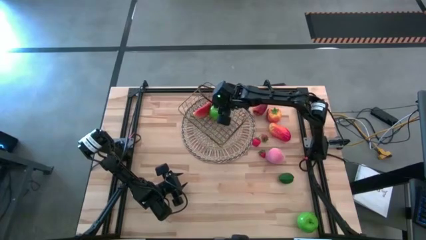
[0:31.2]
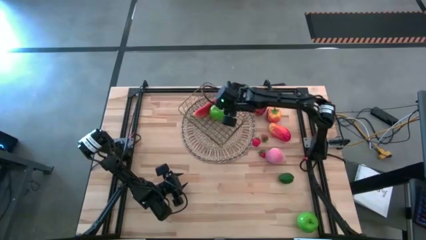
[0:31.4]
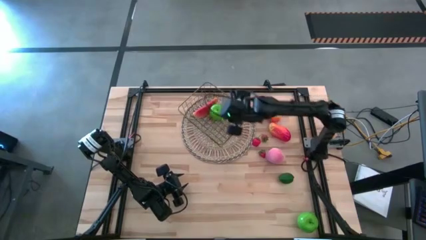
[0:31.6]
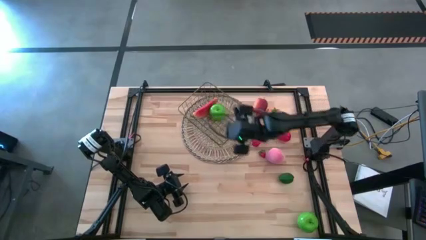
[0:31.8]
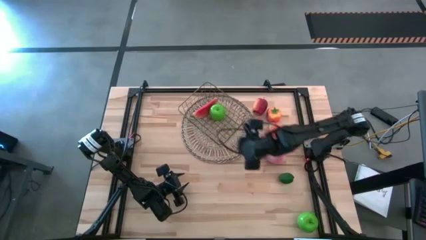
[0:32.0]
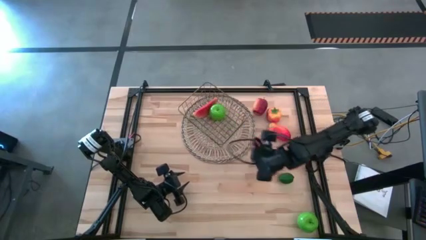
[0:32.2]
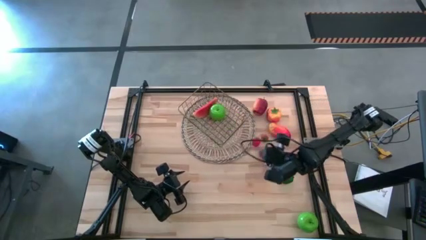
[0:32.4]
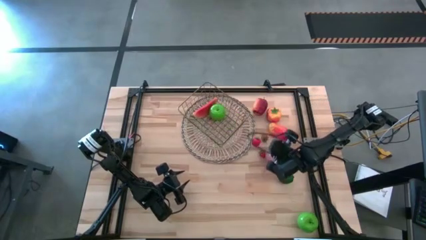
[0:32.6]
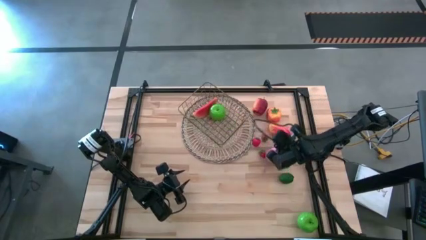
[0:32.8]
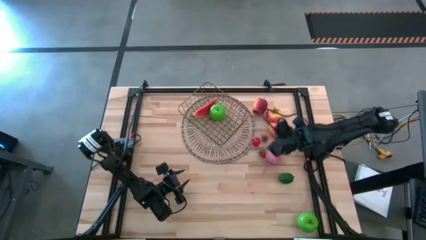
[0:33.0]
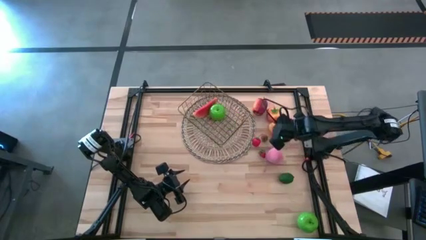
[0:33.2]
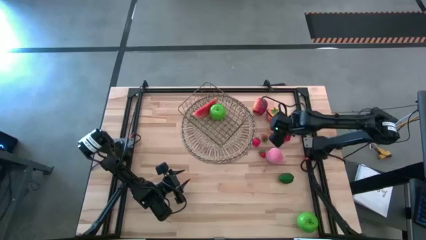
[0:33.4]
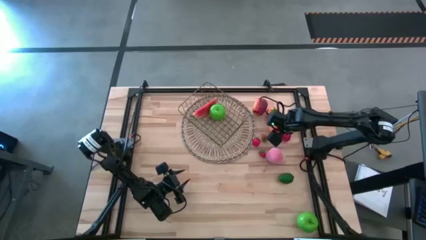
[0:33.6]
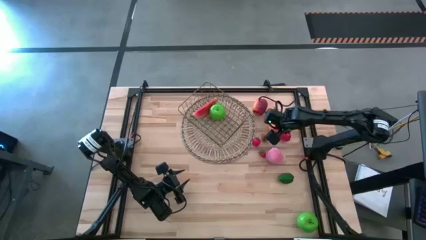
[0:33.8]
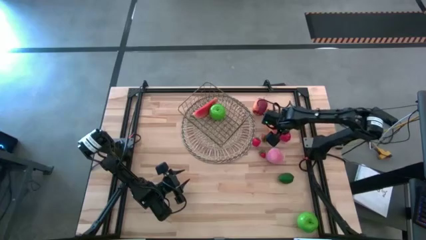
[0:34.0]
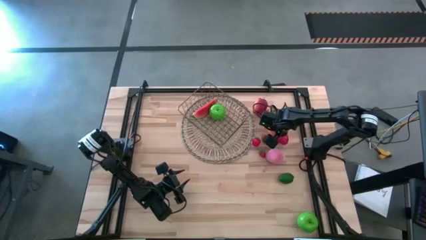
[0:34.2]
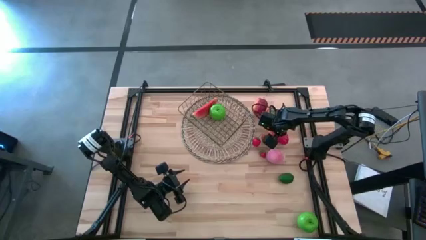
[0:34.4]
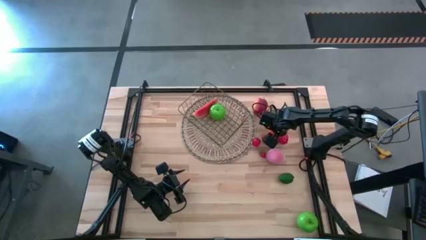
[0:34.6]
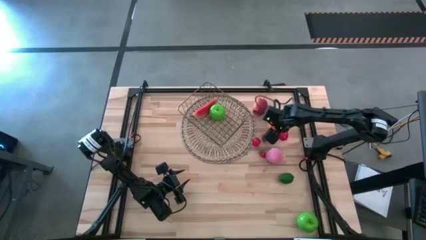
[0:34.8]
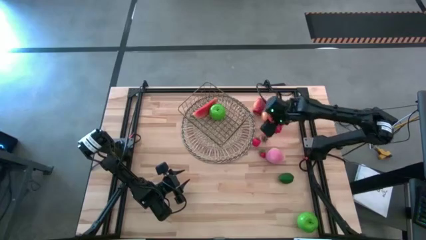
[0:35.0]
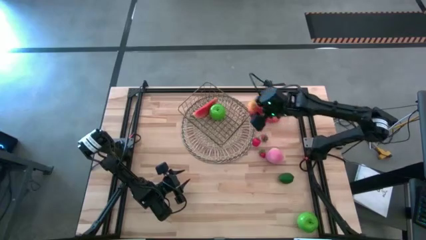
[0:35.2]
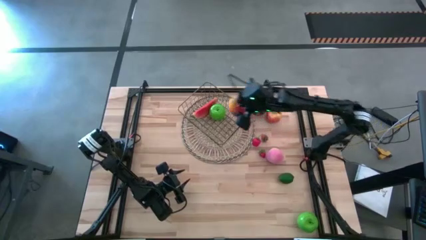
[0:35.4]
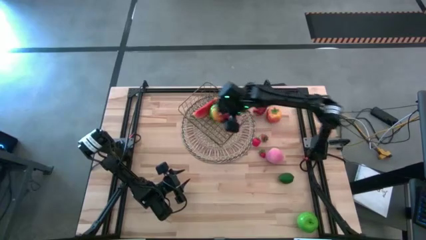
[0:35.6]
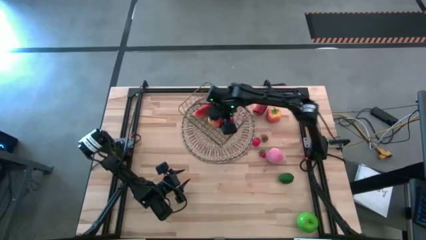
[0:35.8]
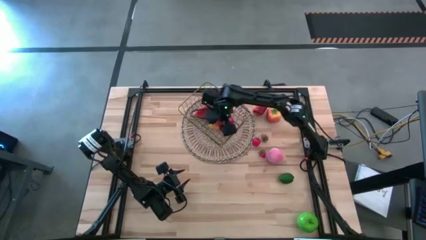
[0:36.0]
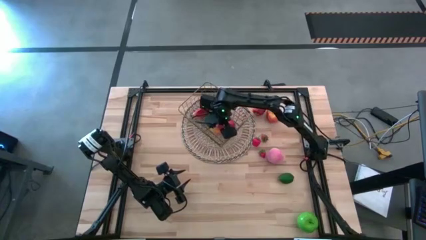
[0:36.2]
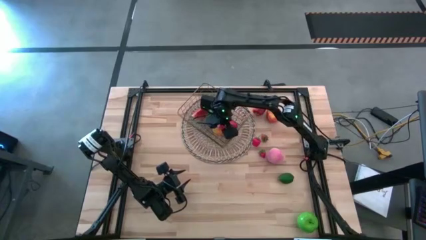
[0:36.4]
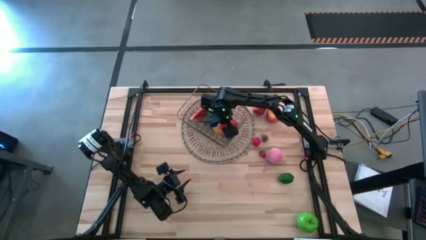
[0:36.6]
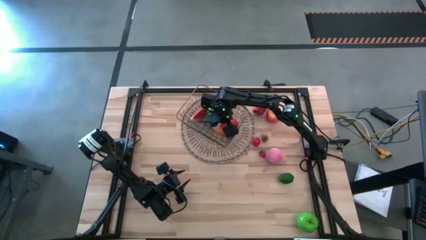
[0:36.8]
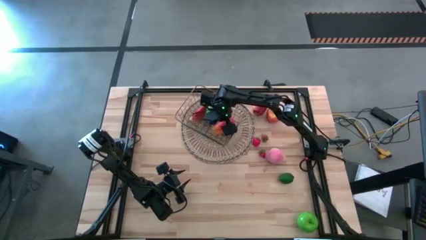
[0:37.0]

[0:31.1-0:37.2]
Task: Build produce basket
Put the red mango into the gold wire basket

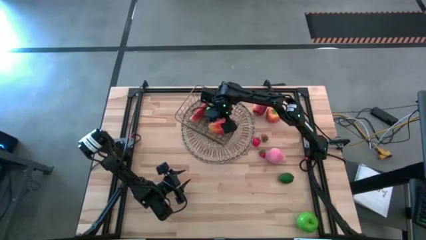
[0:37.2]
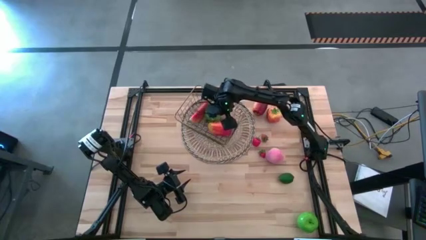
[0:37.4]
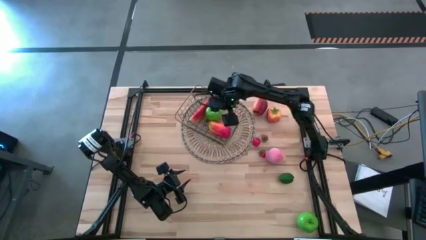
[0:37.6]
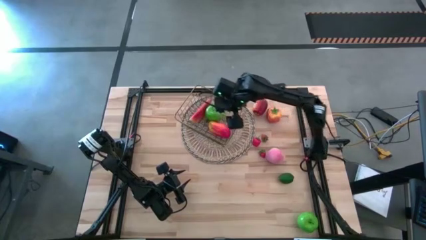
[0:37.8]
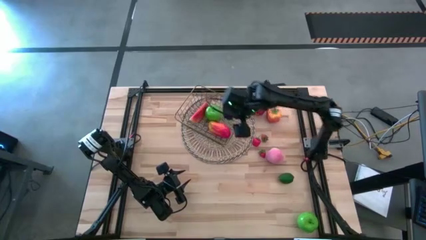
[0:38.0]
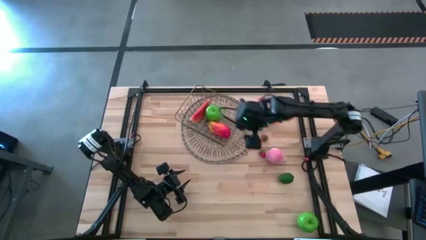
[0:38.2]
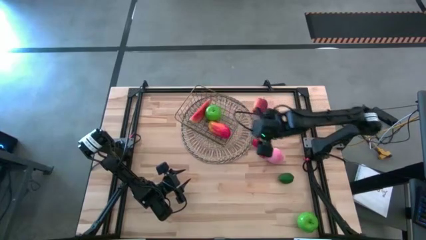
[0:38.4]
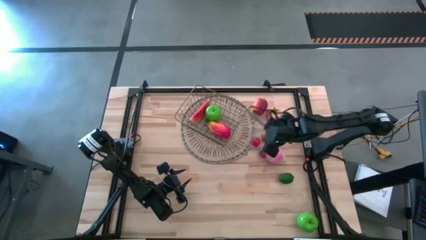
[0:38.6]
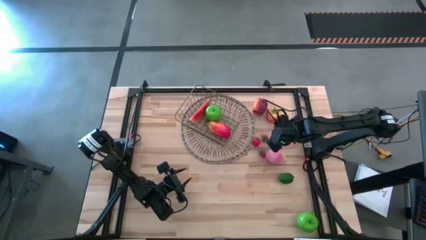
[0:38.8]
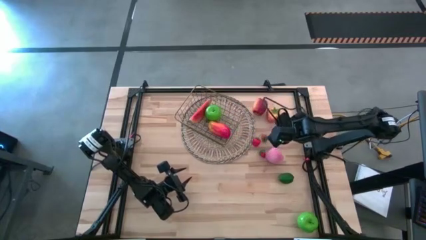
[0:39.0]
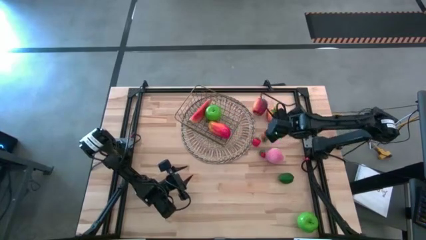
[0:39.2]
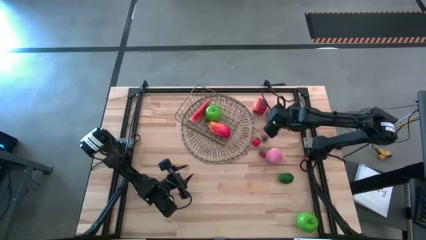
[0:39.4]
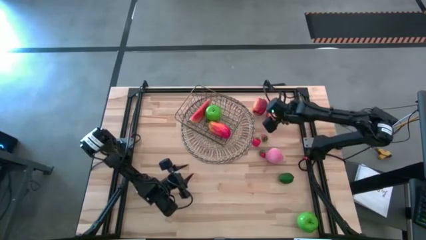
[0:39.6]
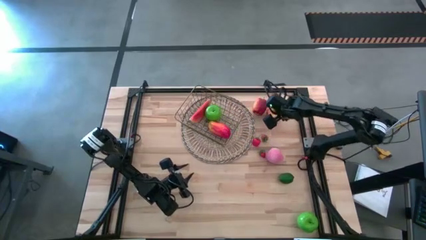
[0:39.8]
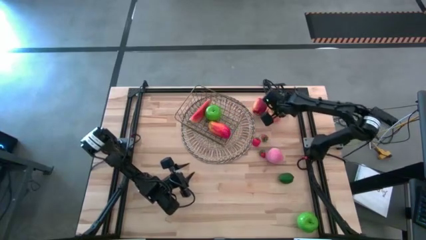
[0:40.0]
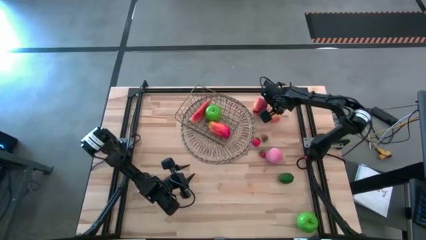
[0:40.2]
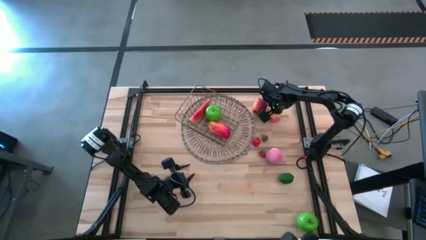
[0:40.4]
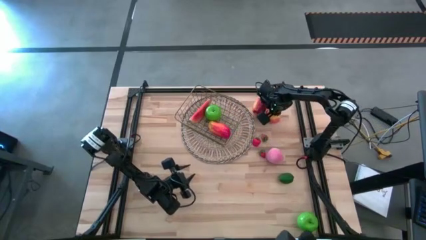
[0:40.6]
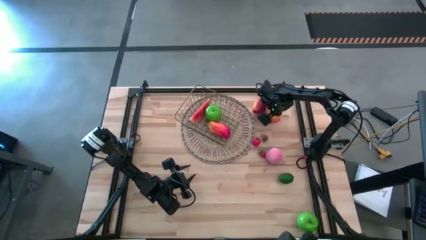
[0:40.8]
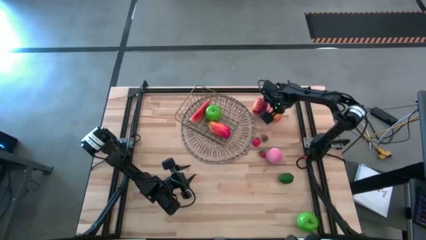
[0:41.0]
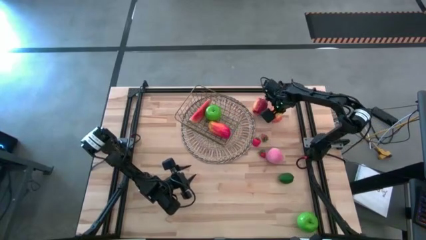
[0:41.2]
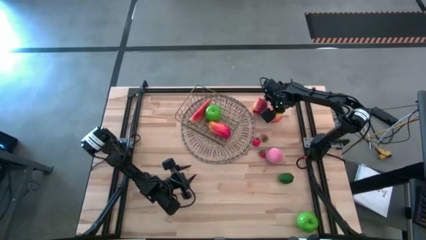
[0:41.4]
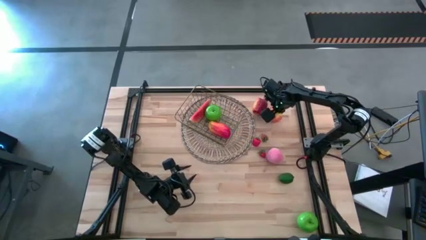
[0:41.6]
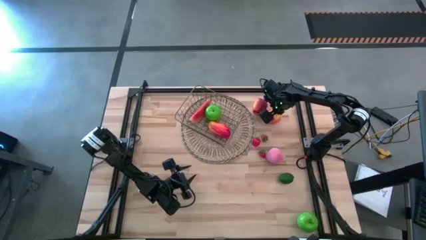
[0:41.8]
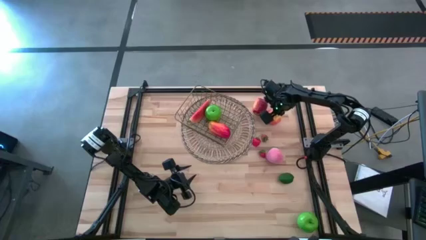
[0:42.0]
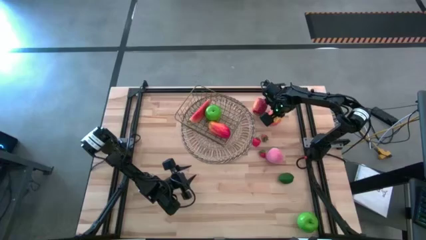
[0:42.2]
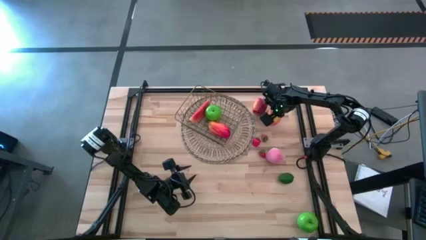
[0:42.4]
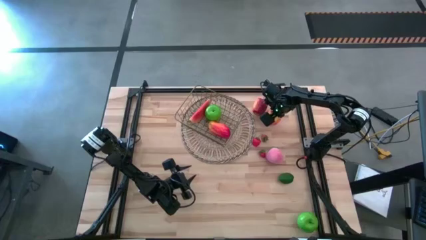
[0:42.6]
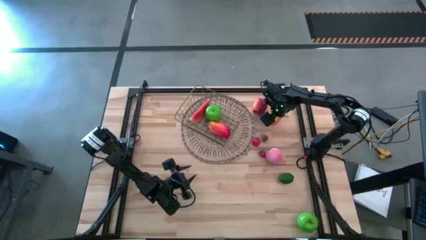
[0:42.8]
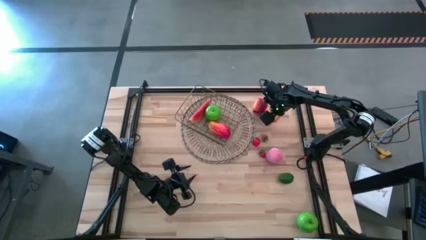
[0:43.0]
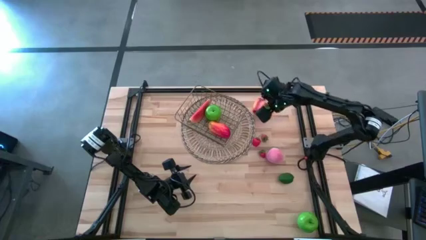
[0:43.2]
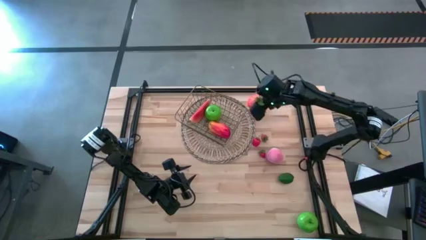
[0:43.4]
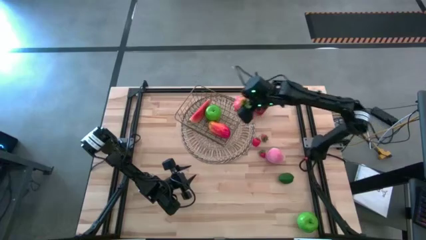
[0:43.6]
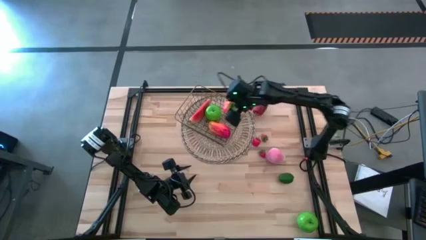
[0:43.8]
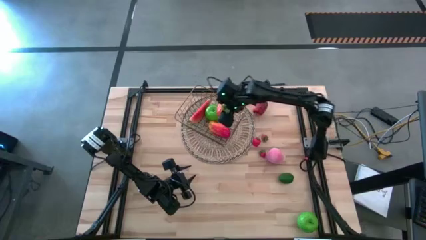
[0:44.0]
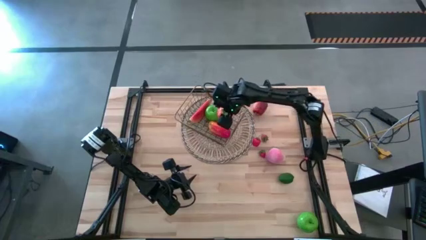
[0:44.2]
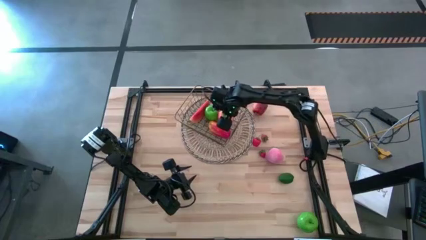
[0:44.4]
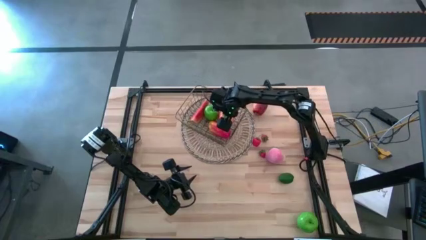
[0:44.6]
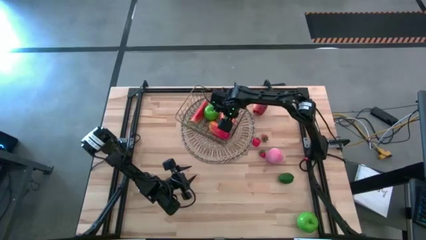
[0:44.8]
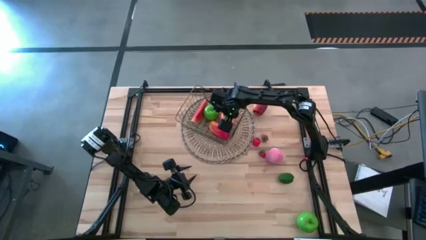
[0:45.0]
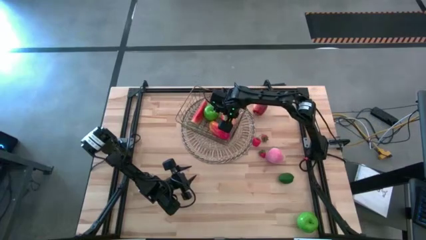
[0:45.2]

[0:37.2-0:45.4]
Put the orange tomato into the gold wire basket

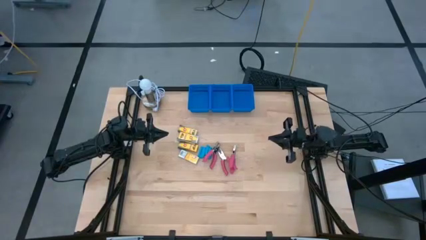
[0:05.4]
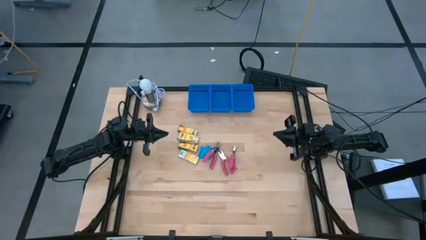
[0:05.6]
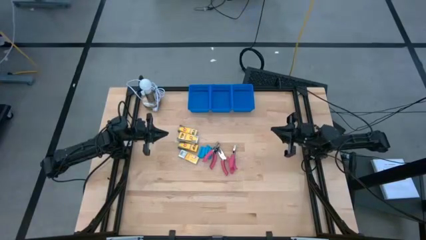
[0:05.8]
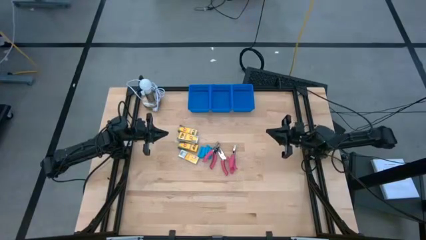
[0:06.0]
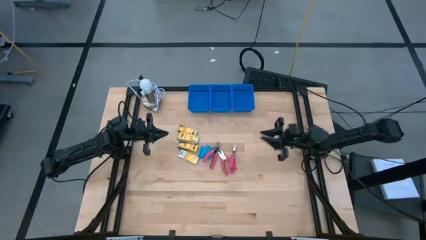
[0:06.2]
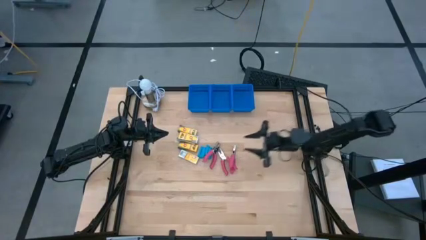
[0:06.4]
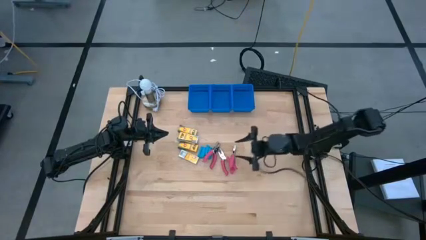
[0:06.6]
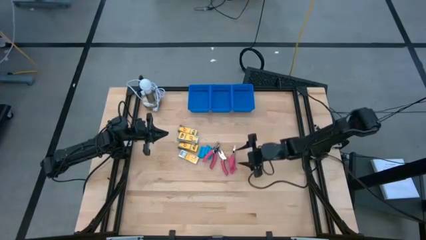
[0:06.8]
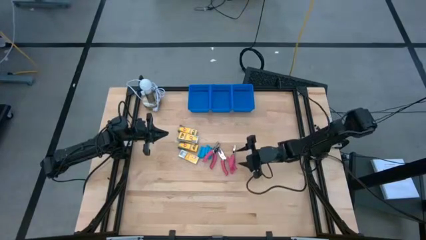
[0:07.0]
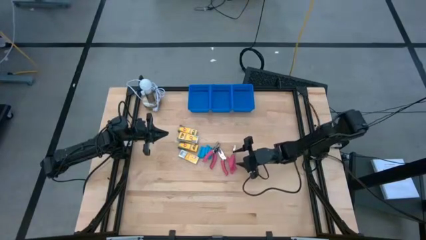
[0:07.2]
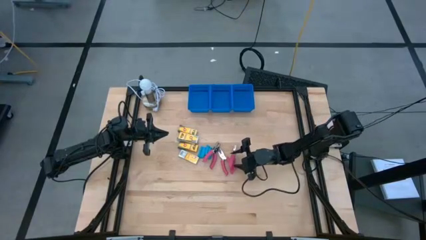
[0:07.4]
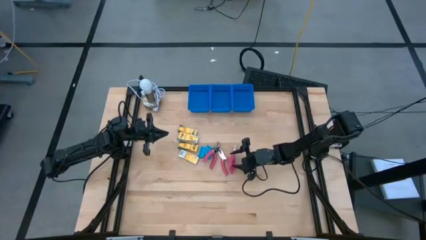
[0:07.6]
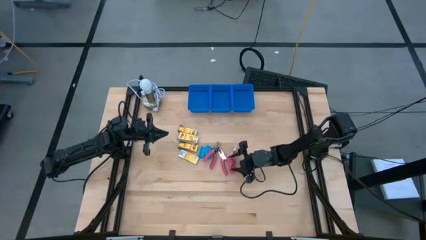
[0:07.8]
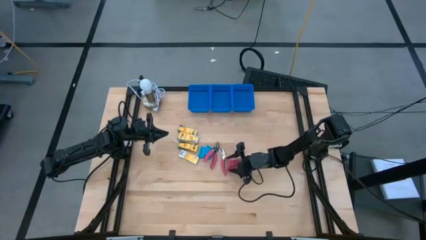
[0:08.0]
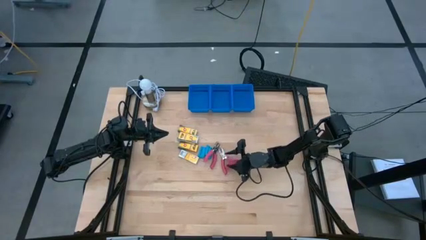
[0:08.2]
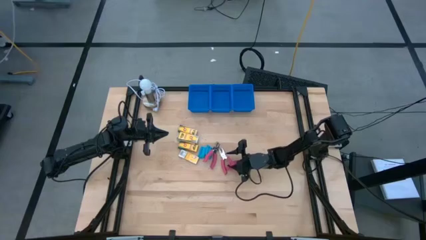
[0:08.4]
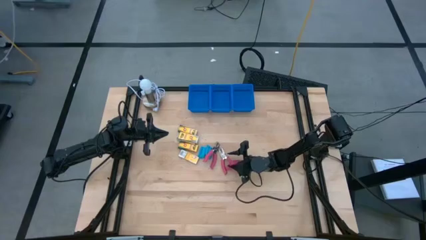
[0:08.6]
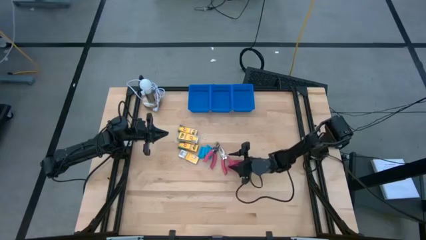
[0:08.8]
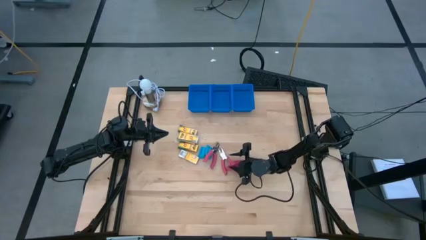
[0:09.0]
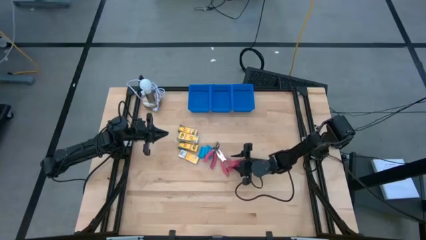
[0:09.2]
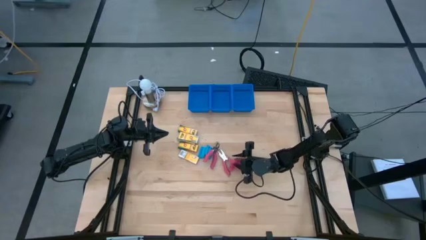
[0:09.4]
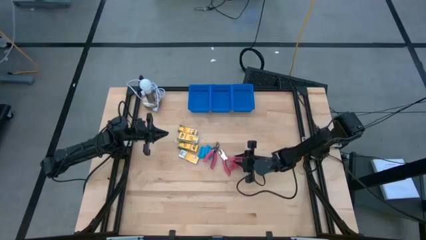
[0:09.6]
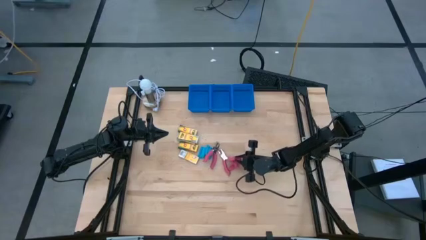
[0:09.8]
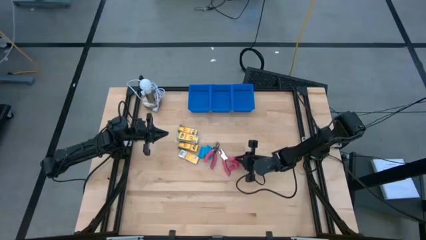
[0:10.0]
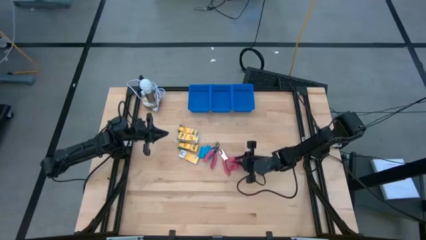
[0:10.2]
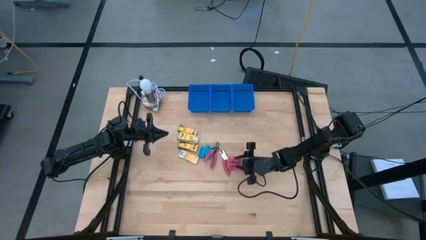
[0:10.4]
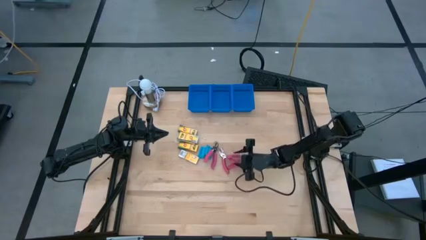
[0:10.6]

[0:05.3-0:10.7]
Task: Pick & Place School Supplies
Put the red ticket punch into the right blue bin
